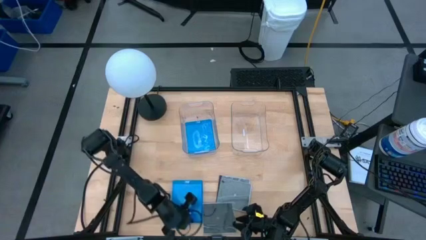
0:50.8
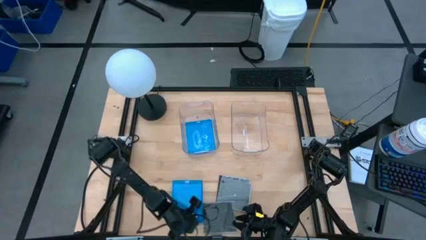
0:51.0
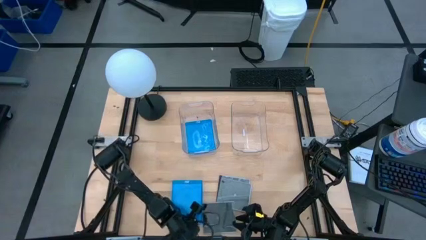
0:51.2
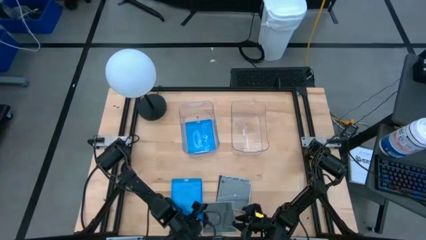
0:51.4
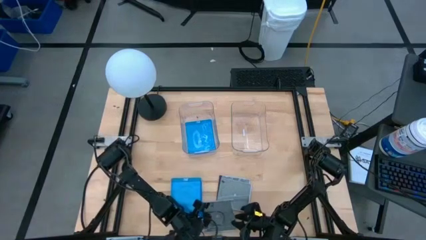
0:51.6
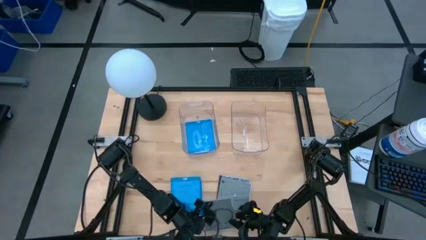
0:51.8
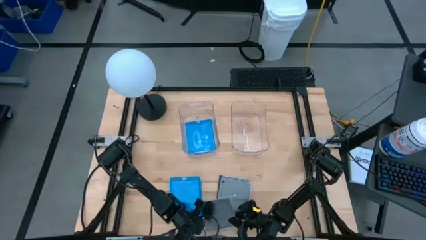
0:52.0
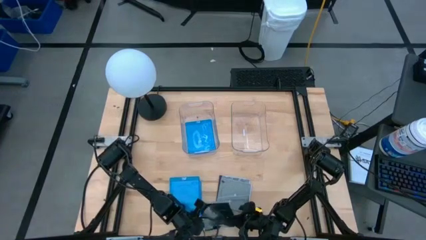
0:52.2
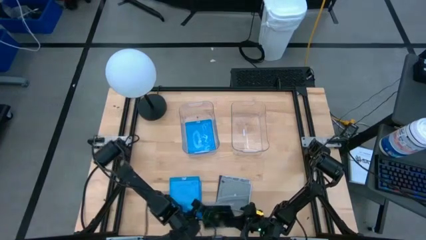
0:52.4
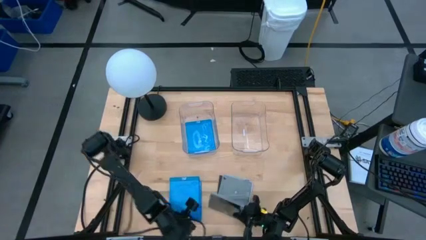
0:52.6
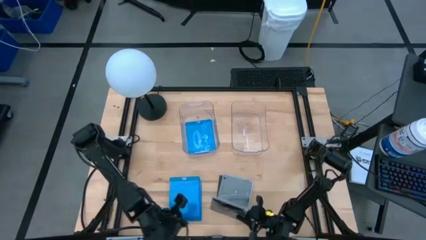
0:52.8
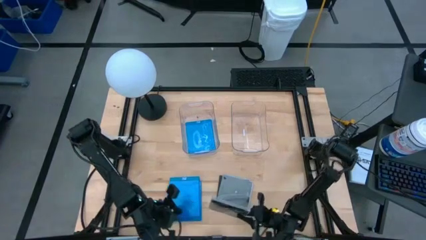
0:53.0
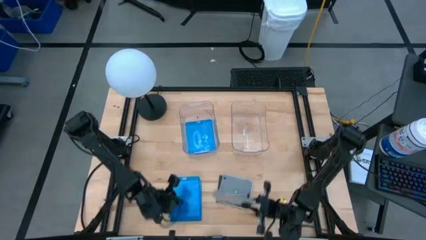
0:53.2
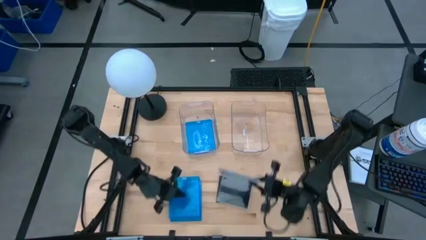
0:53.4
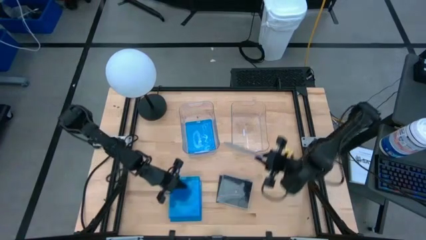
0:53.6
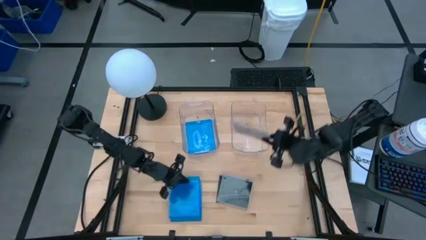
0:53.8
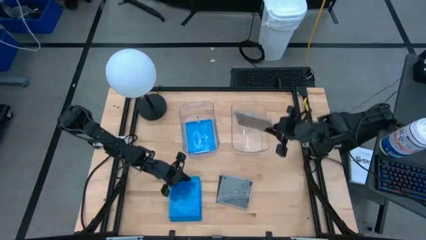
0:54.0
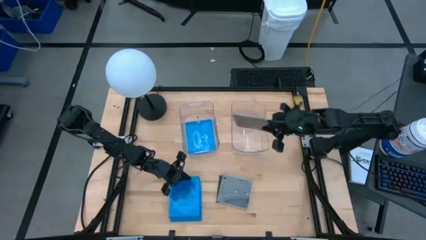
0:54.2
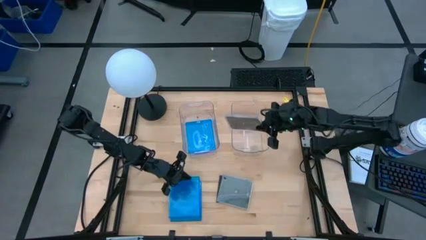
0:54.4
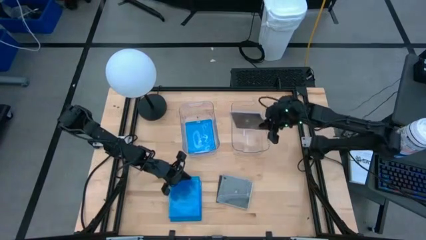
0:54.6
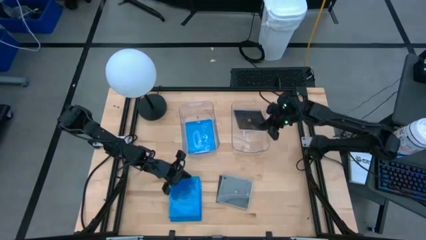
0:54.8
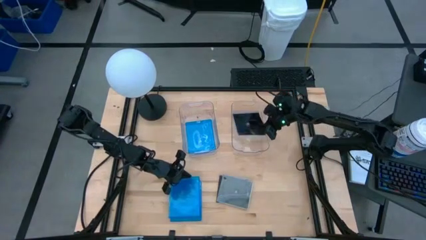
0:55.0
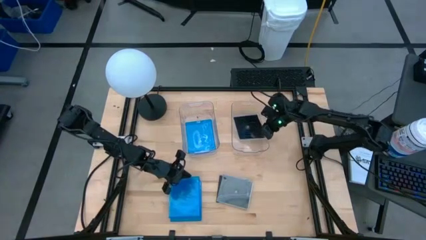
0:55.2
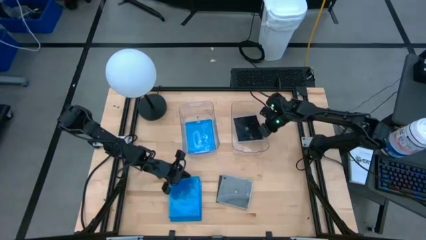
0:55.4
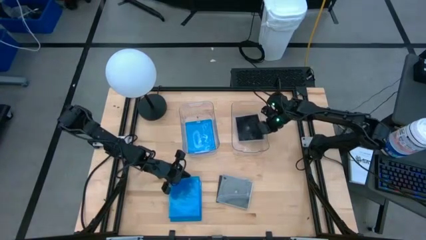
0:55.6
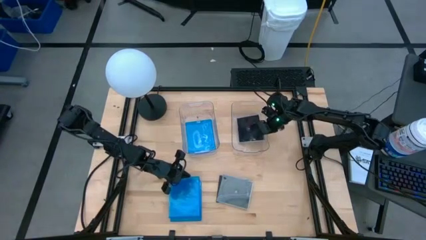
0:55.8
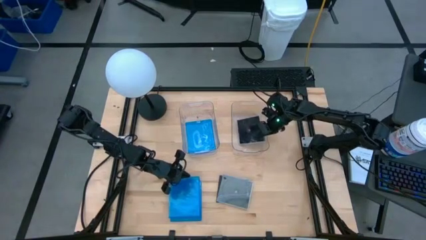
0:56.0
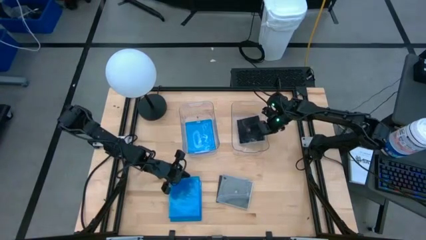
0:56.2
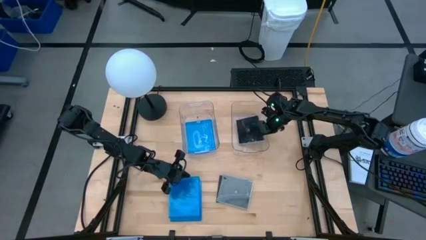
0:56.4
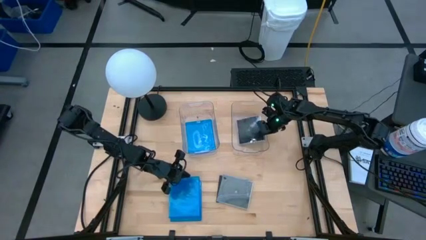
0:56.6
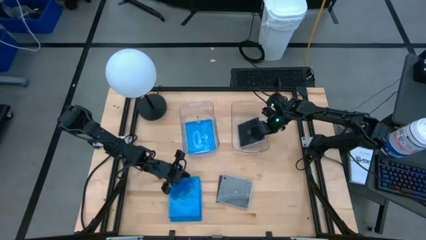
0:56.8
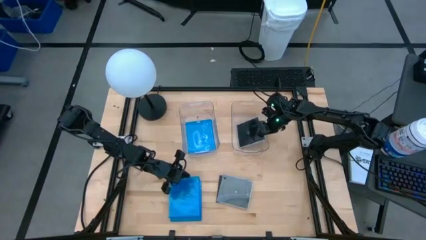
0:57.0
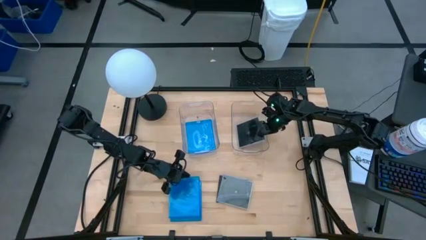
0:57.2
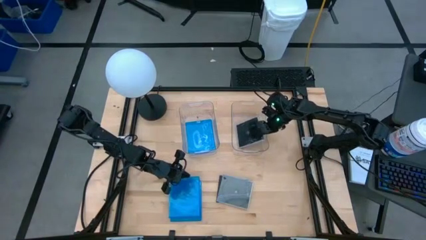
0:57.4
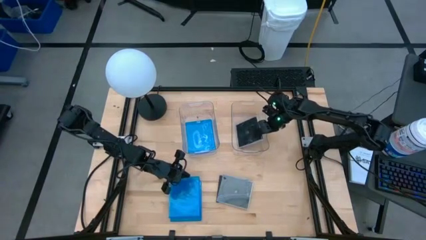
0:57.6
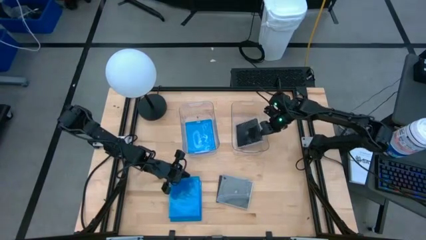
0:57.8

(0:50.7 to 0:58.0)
Task: Pick & place jewel cases by type
Put the black cd case into the right transparent bin

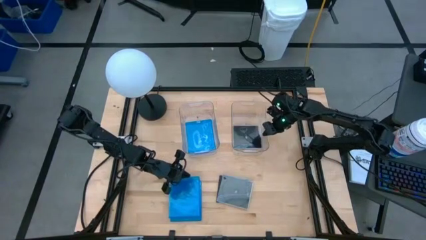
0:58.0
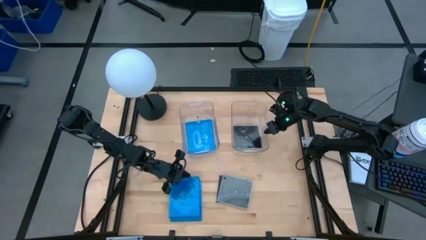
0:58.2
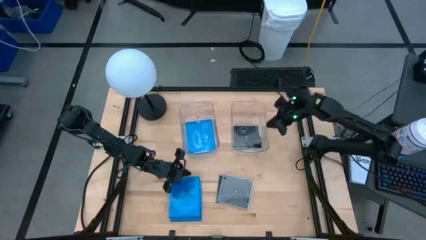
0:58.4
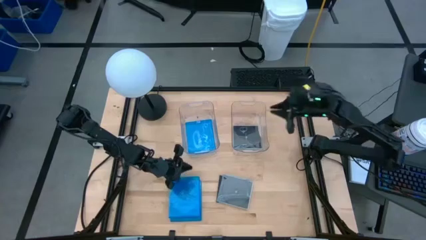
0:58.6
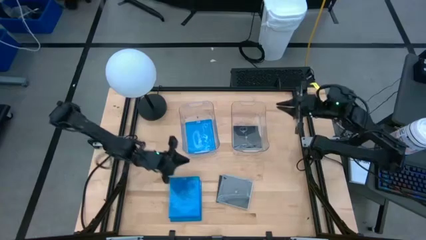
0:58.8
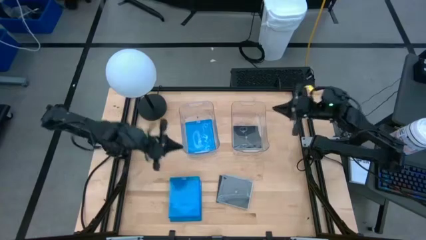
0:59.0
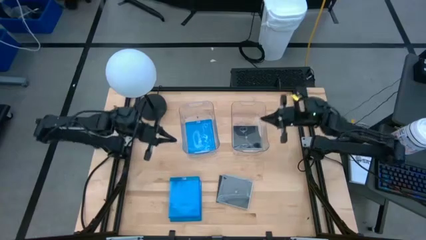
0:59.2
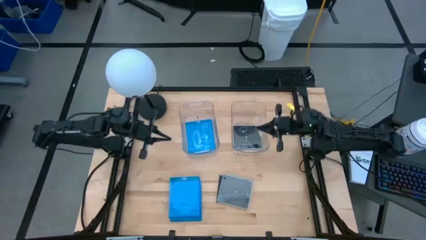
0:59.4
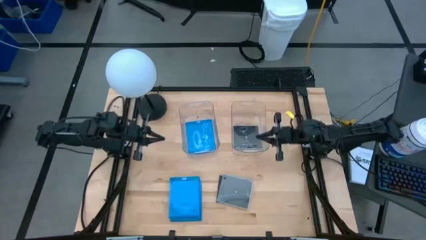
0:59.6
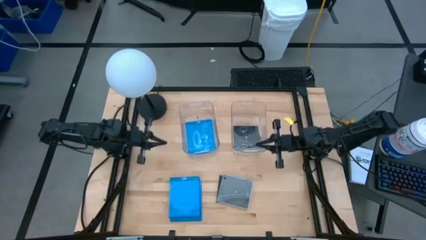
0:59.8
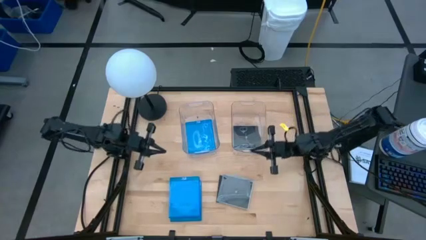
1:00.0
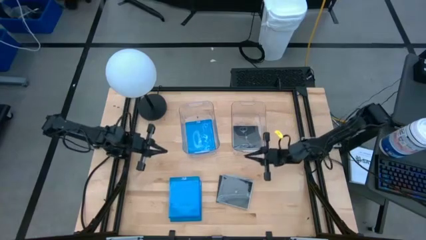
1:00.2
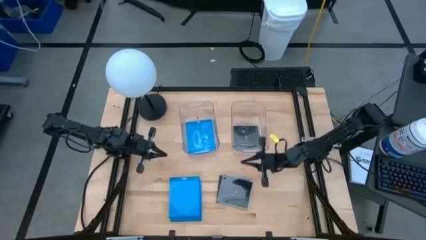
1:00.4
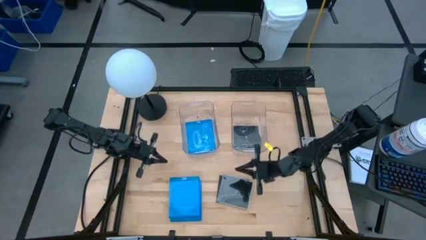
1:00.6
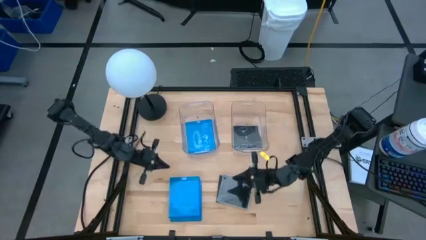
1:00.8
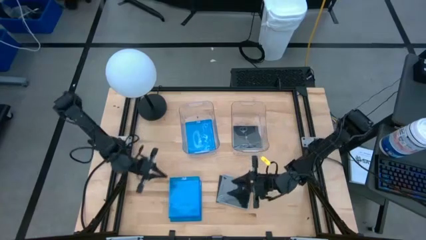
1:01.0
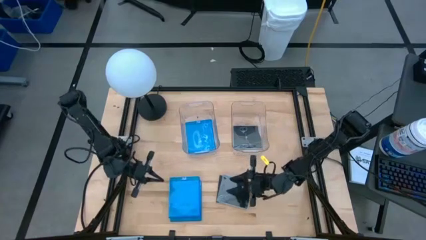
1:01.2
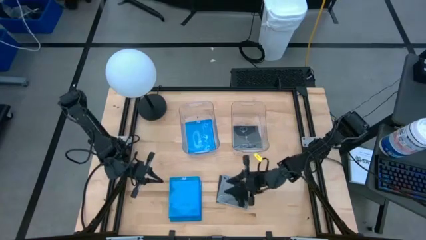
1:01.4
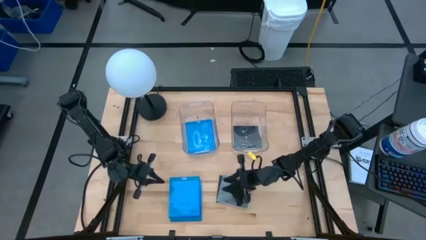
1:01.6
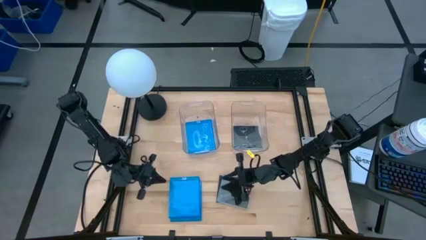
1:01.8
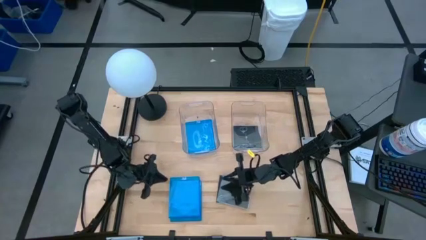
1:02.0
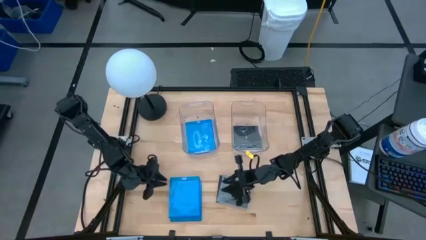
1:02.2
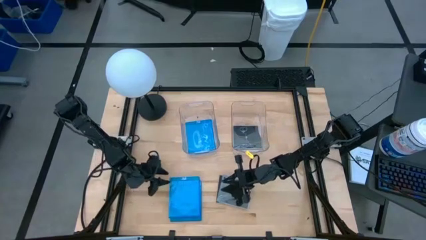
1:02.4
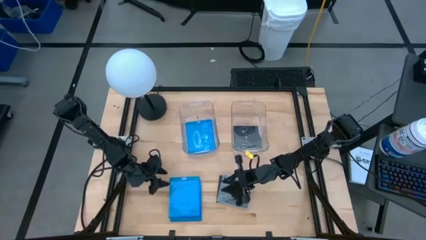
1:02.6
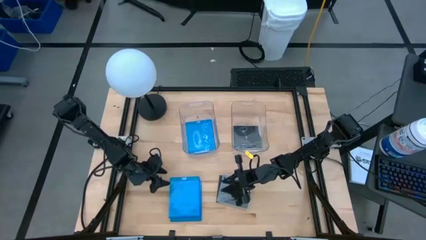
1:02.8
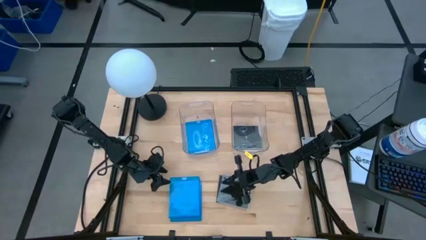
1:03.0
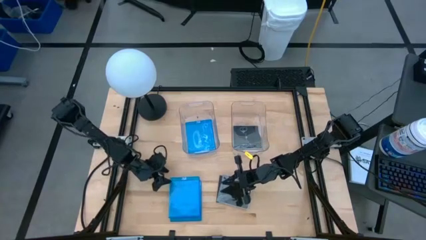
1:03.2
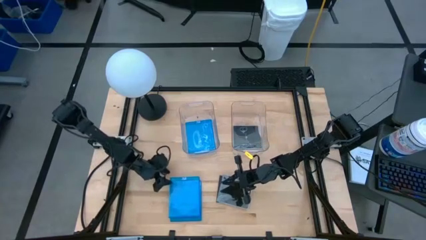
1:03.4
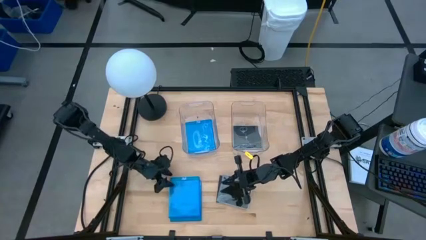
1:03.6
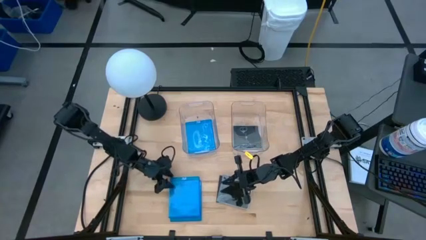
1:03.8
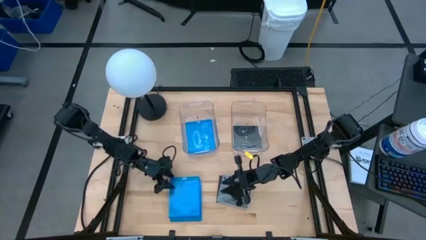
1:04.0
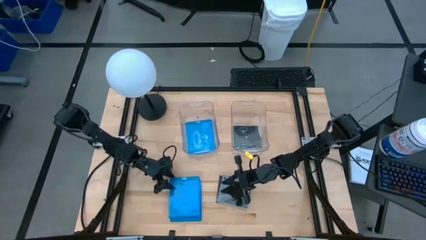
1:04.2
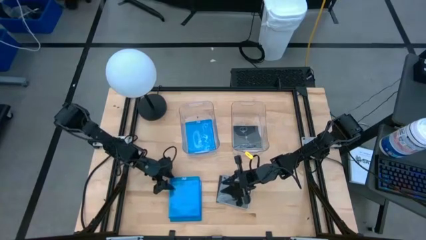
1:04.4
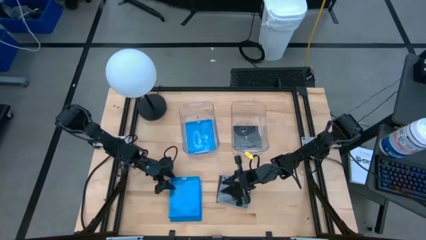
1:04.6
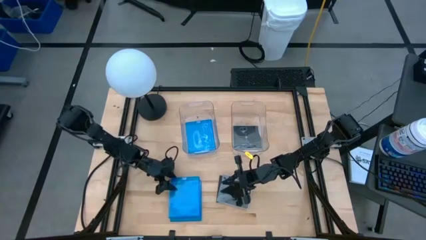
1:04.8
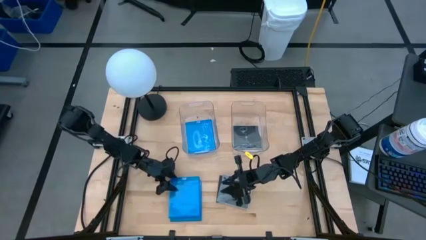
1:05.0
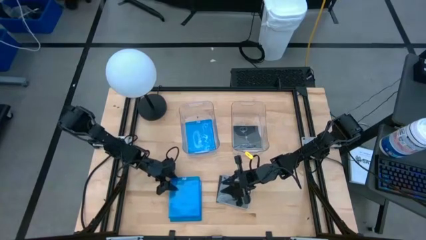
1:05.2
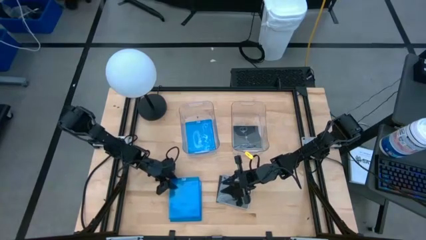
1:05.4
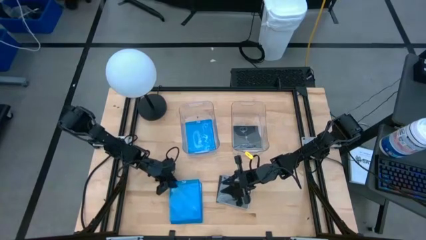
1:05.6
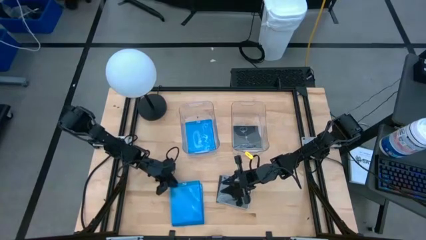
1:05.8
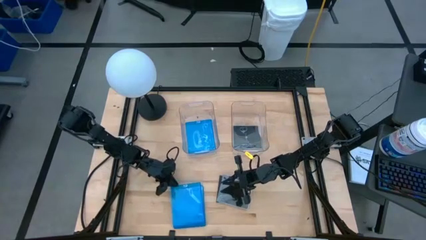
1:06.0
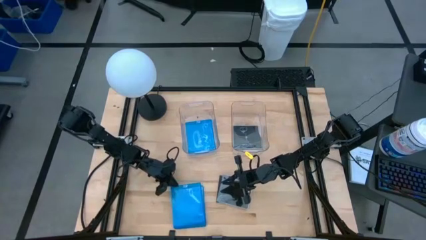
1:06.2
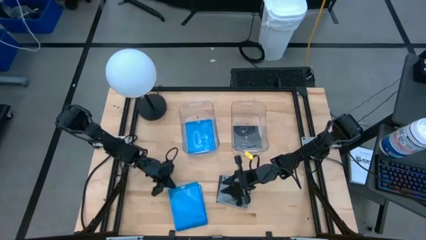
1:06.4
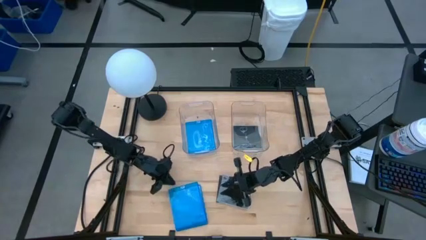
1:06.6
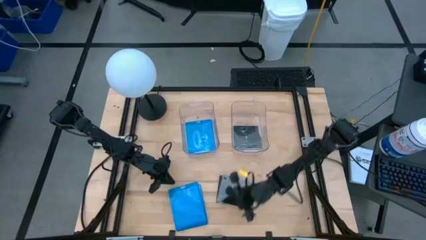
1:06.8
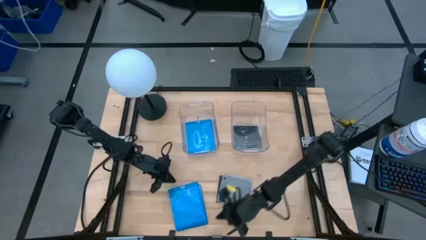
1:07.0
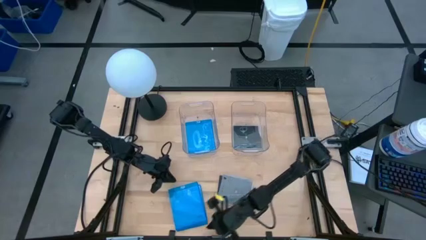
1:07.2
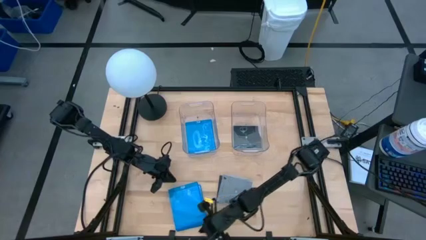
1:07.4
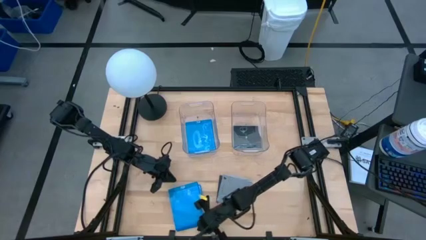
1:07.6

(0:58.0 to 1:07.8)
Put the blue cd case into the left transparent bin
